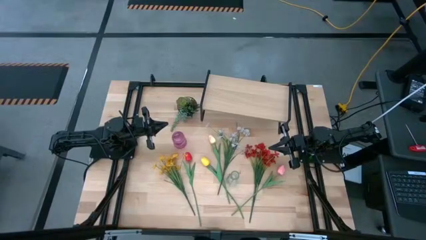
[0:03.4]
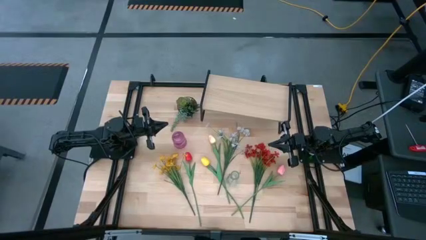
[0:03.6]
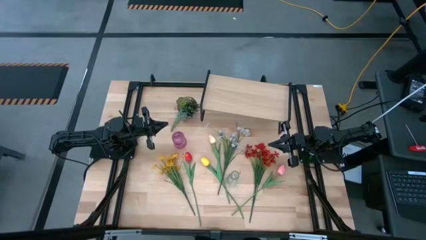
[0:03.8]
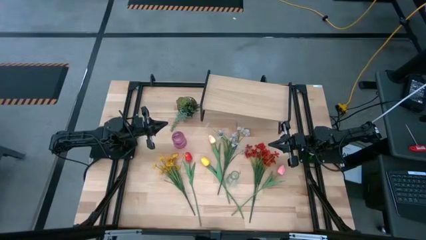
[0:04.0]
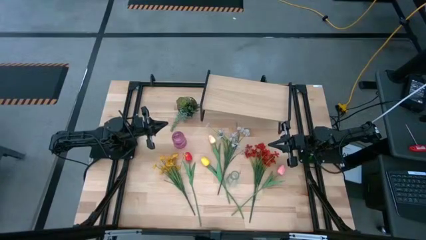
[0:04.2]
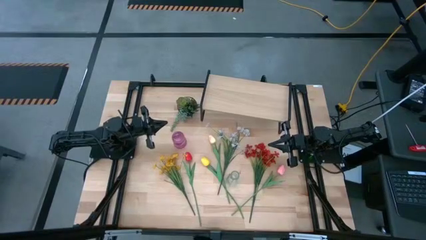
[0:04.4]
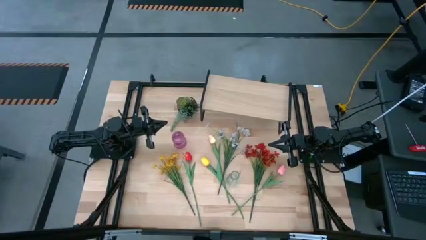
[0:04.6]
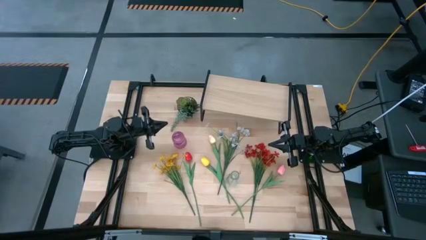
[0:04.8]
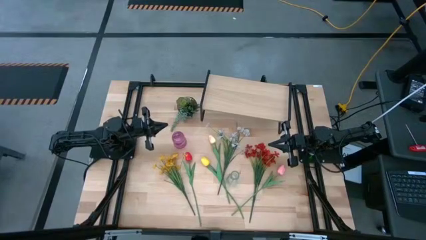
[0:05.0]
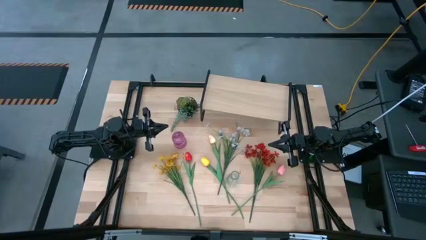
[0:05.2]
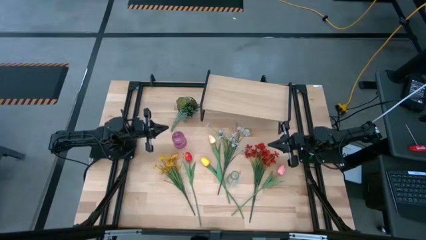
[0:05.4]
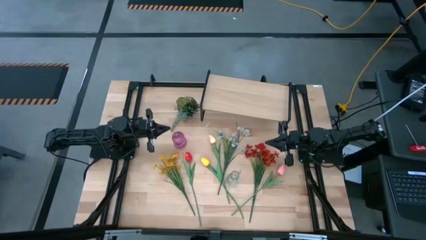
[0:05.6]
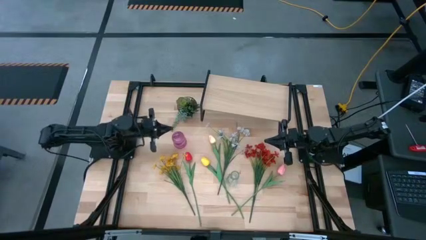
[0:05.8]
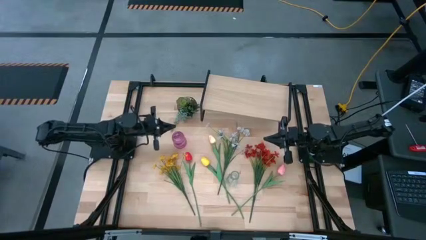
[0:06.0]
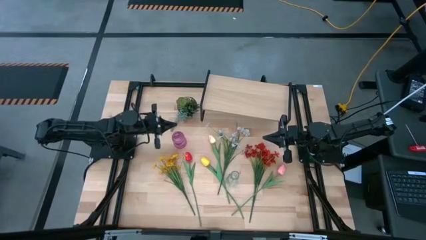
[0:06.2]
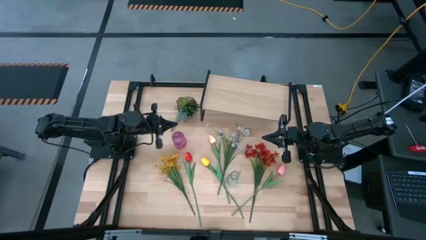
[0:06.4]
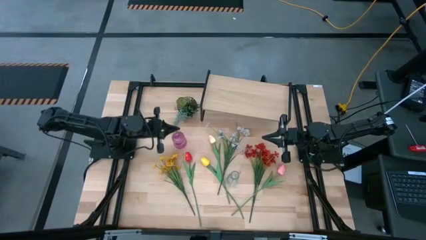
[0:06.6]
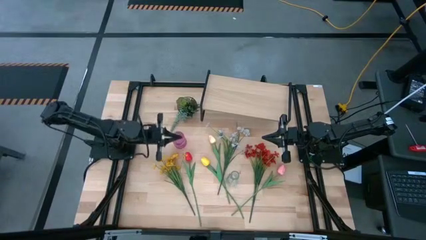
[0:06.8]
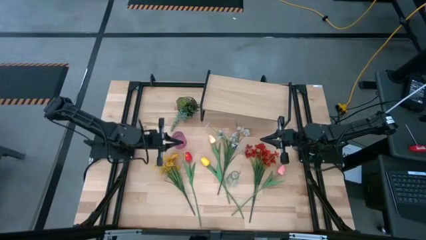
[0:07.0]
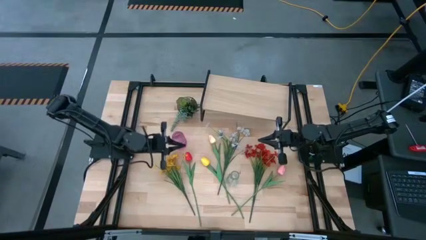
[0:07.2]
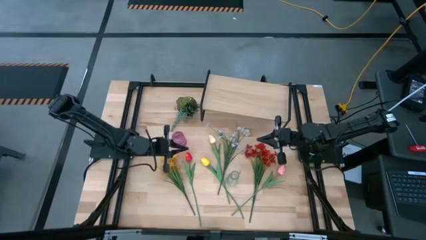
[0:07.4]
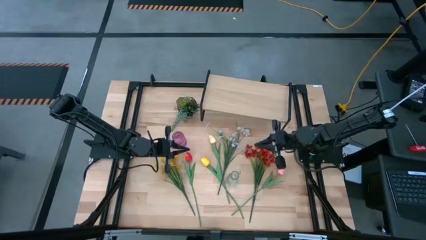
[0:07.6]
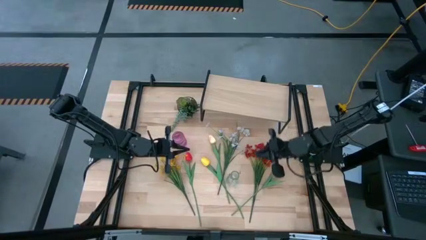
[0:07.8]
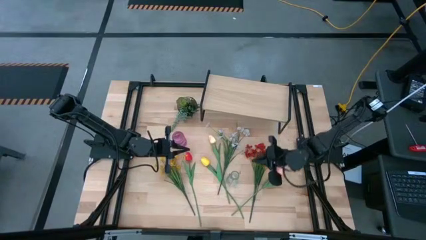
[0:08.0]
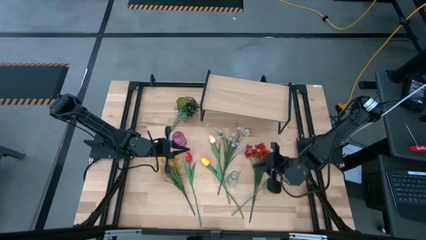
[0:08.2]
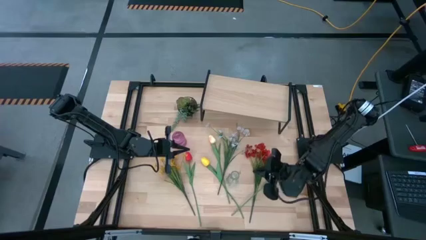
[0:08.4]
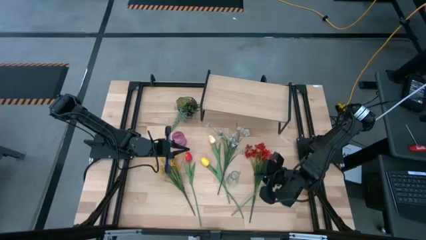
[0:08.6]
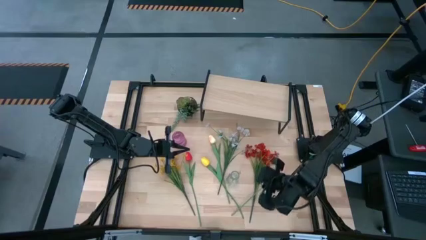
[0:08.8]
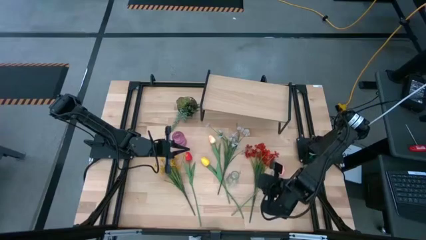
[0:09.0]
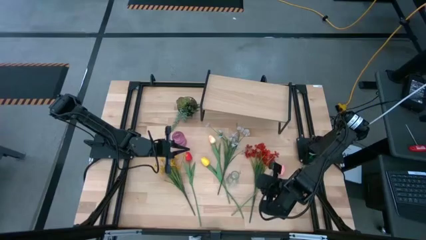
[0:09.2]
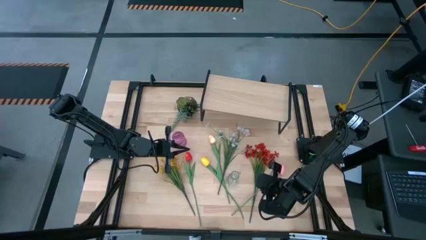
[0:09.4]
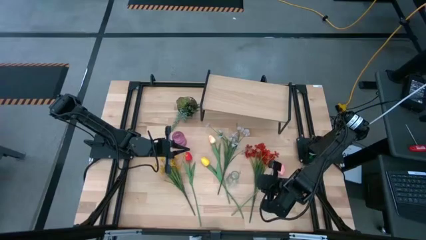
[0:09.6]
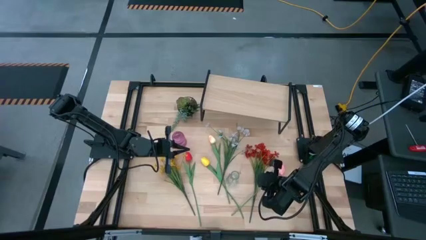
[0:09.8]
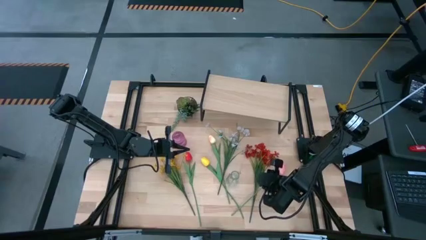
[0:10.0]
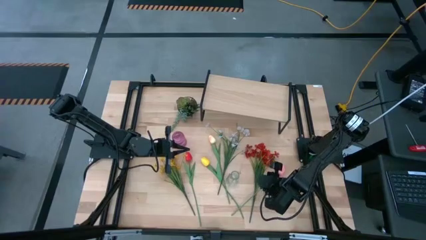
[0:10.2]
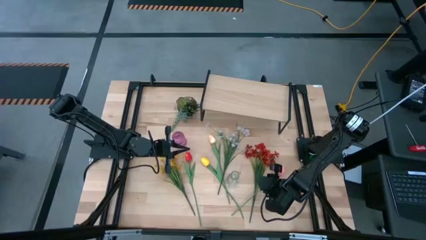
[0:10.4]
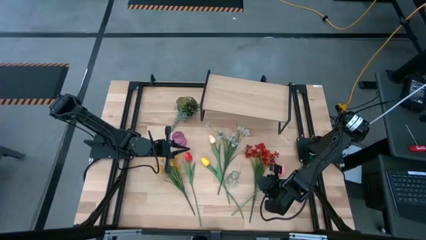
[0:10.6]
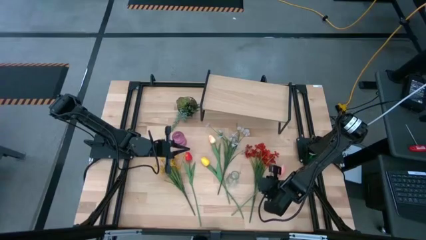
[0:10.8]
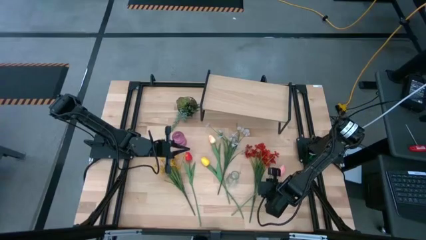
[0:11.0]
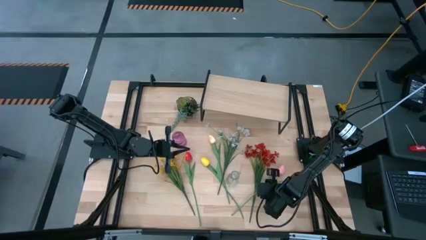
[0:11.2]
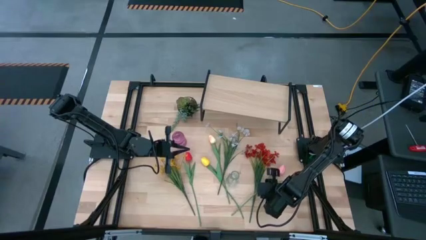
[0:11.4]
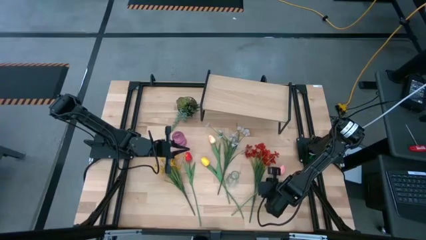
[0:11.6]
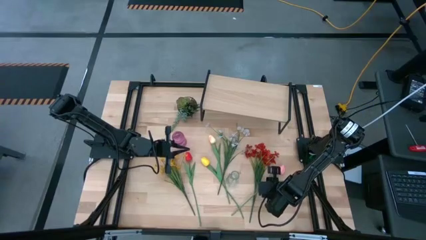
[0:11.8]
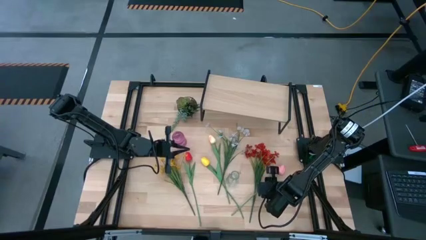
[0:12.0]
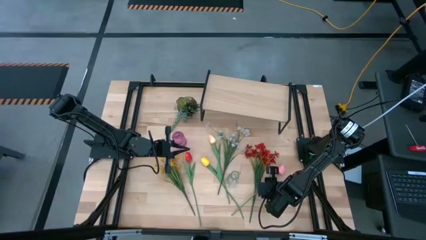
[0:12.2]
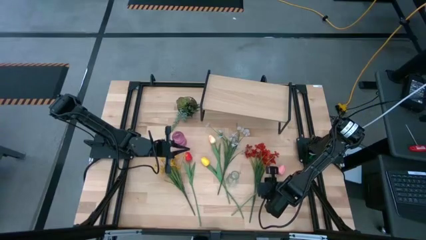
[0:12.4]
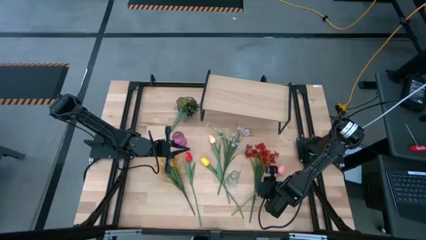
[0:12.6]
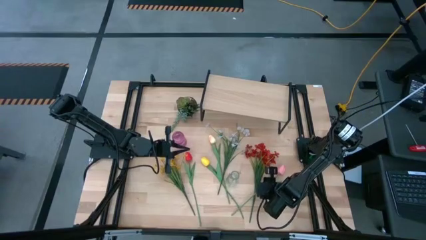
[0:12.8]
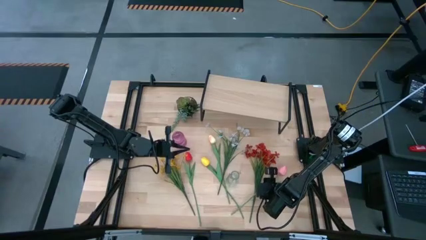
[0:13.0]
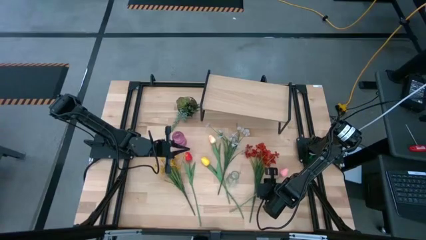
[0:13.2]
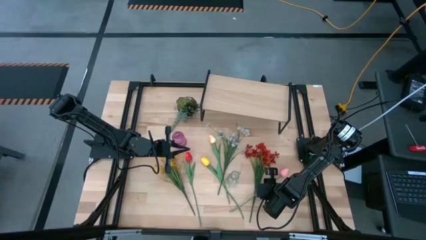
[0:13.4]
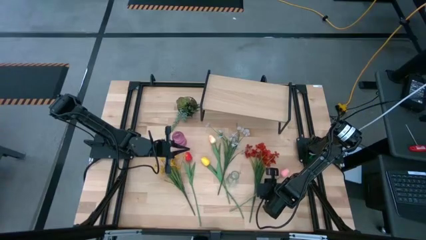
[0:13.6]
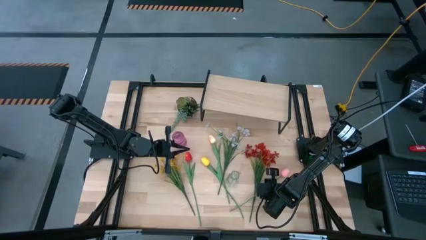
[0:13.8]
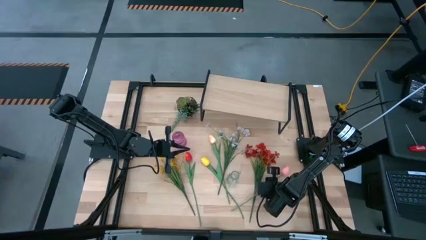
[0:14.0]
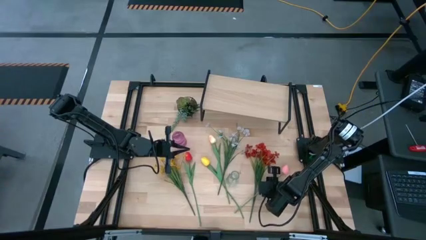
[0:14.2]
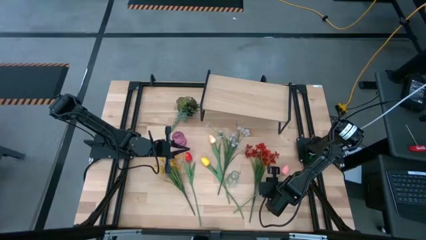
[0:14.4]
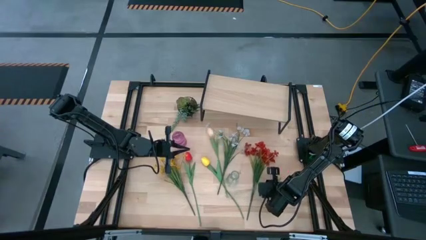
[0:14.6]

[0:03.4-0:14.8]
Task: Pick and place flowers into a vace then onto a shelf
Put the pink flower into the violet vase

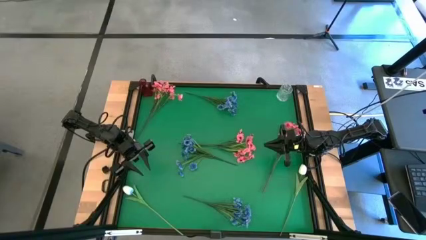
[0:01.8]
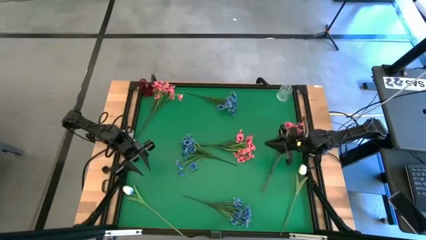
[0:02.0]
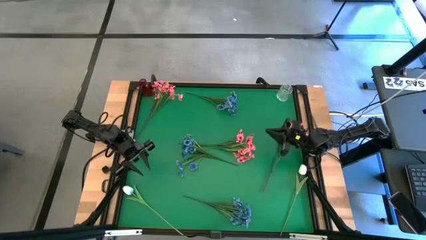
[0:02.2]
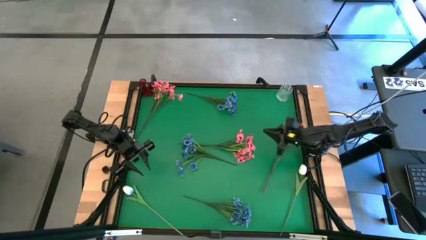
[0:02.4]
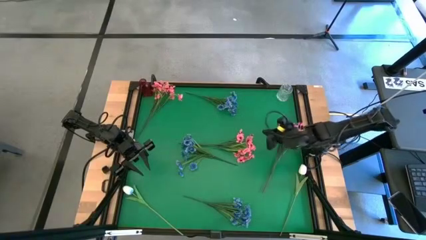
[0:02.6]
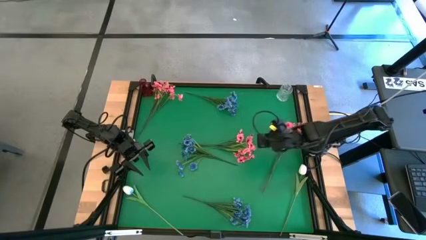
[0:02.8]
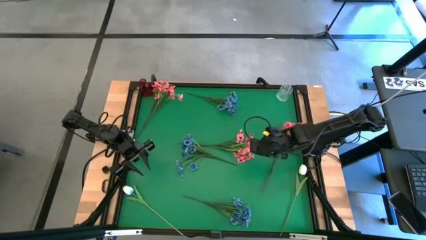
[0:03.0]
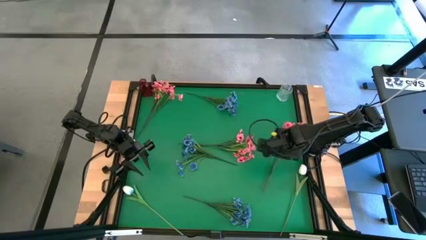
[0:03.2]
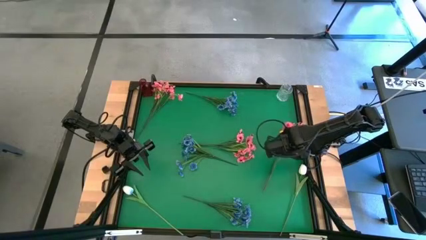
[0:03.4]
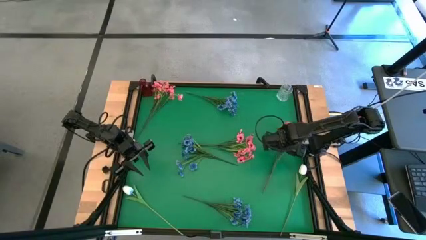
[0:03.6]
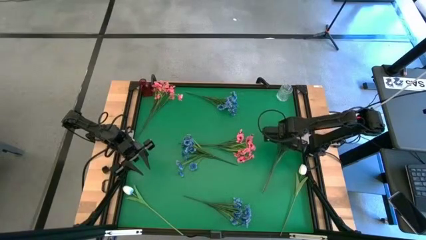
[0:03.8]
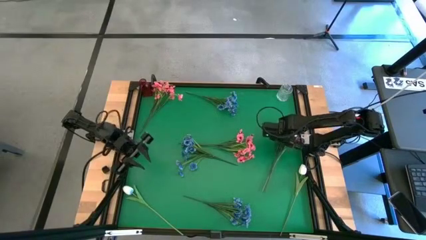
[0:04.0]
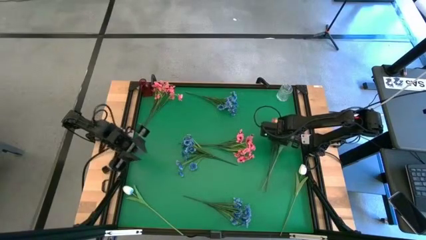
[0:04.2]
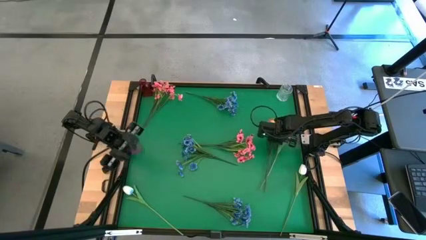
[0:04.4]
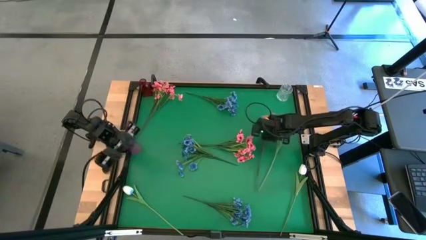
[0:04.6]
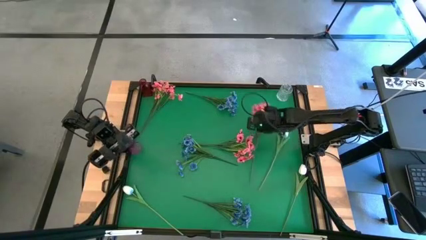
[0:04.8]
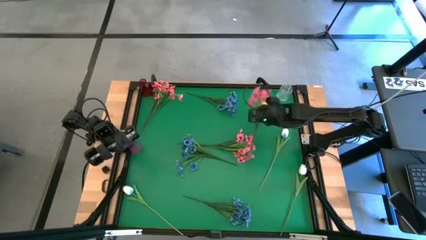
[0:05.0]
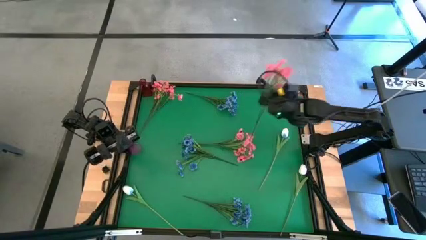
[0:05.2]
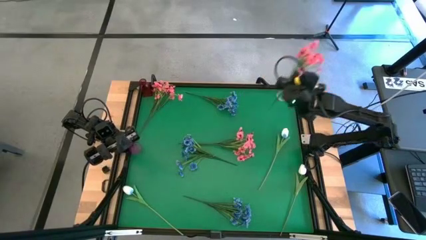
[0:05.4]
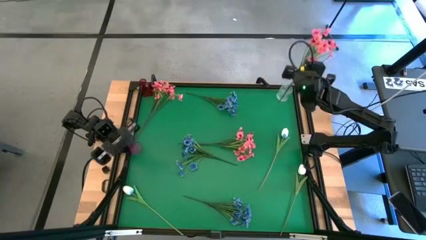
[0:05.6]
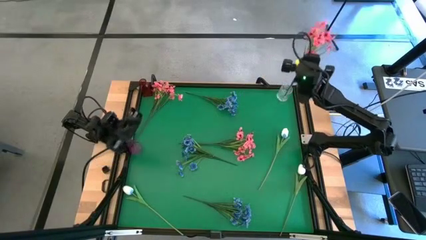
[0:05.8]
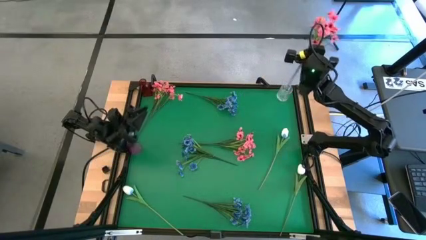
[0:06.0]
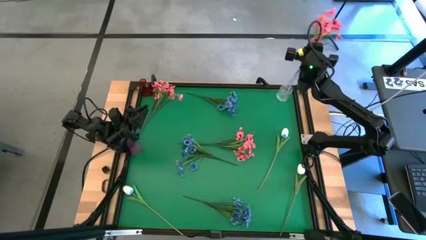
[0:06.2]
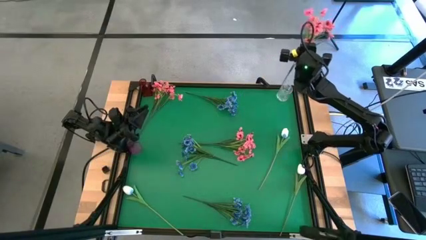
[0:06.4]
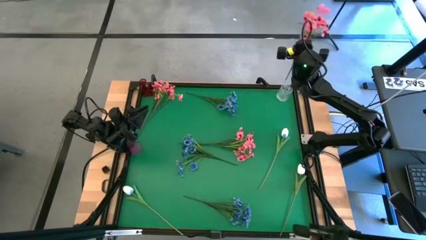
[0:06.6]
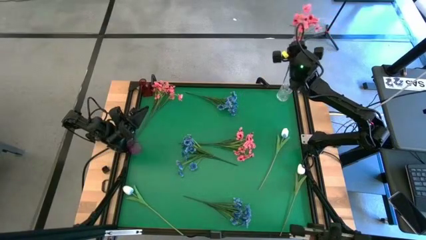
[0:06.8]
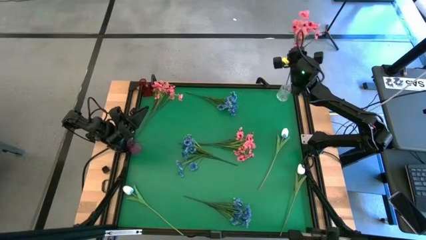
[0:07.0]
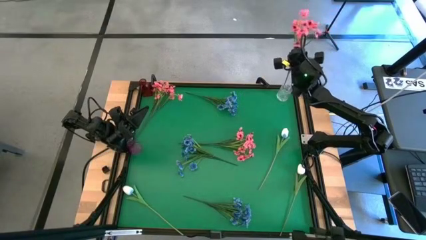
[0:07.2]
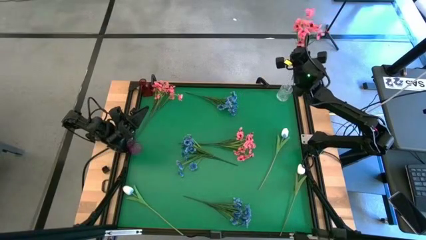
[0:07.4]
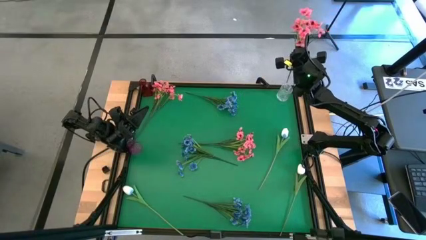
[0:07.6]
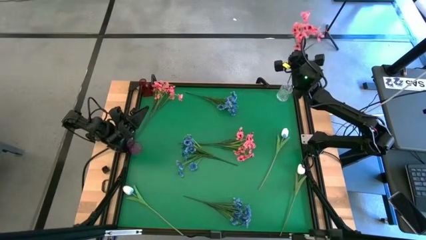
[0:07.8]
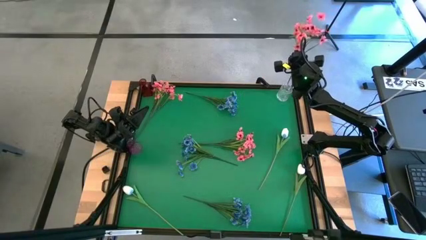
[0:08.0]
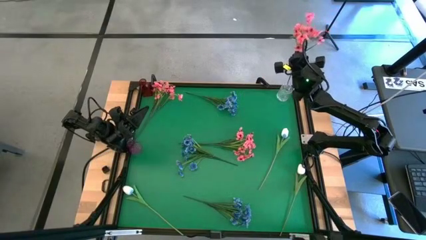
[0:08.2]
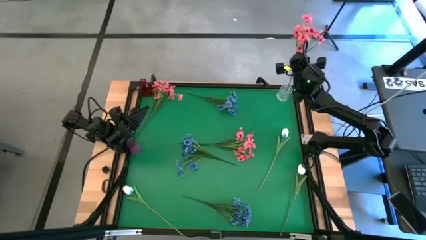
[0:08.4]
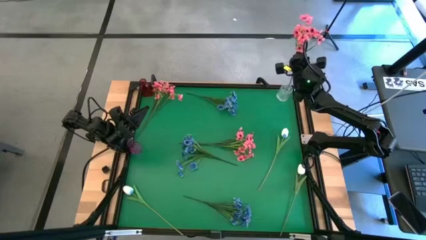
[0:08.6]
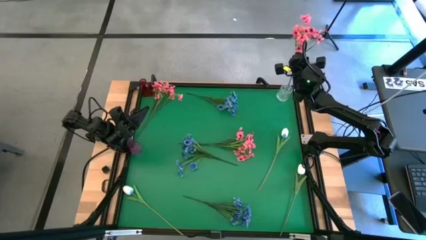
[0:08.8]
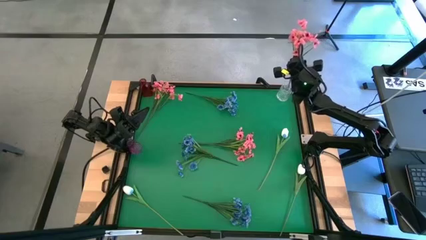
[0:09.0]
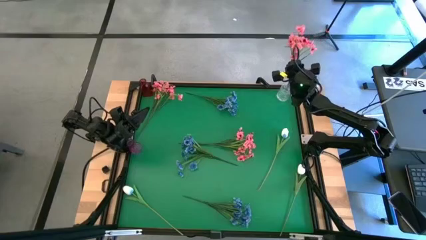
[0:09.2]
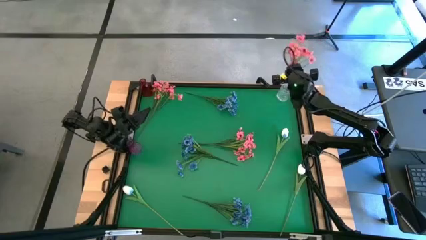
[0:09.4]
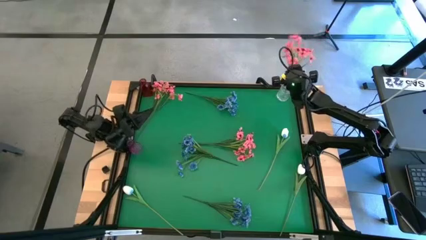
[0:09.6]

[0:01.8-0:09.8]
Task: Sort flowers into vase by color
Put the bottom right pink flowers into the transparent vase
